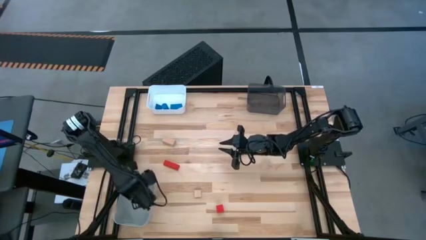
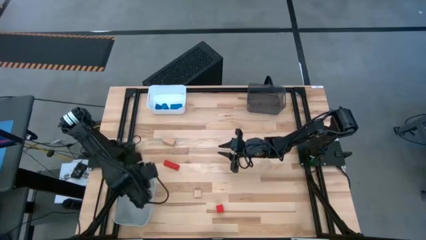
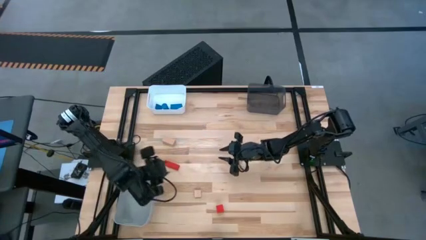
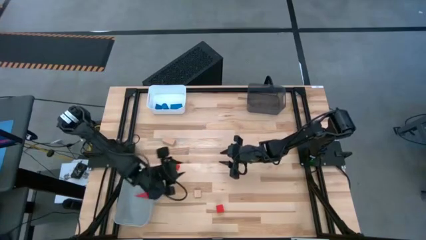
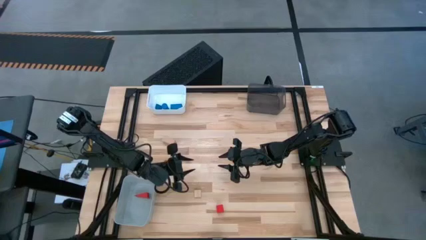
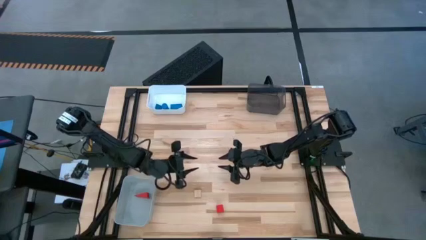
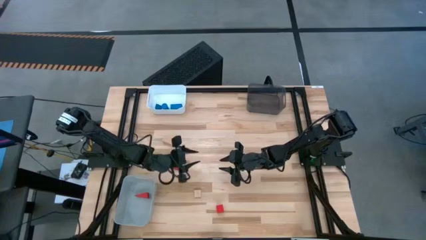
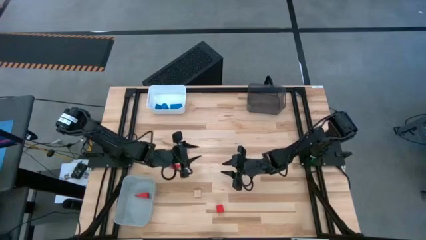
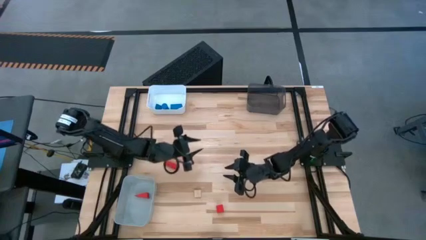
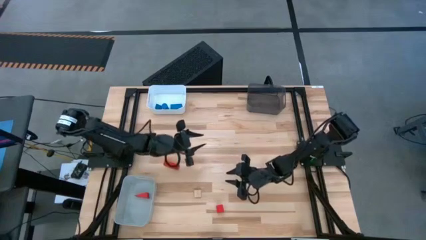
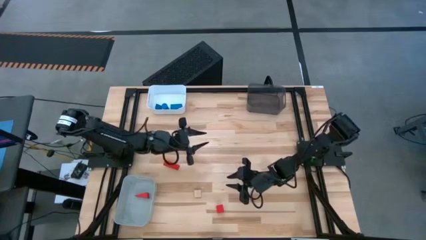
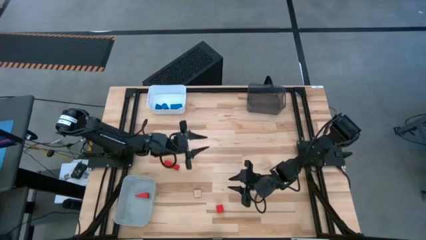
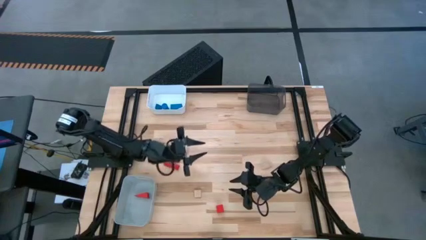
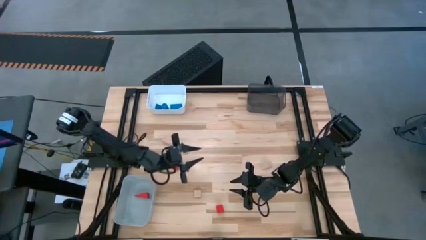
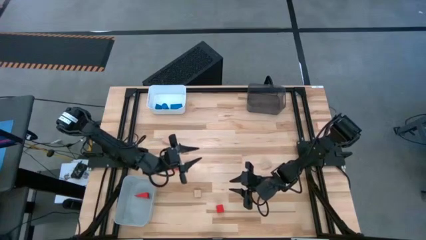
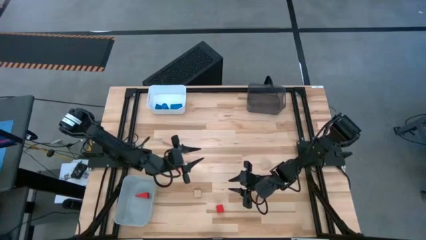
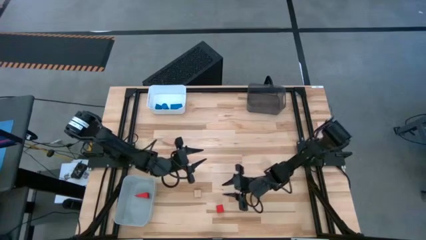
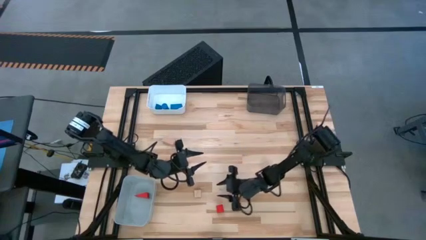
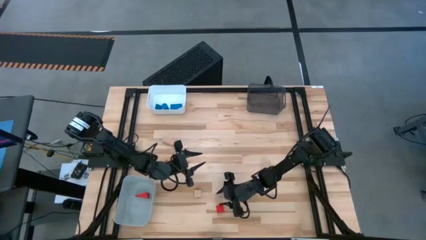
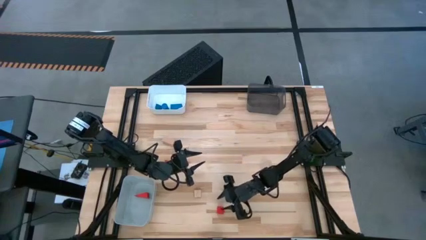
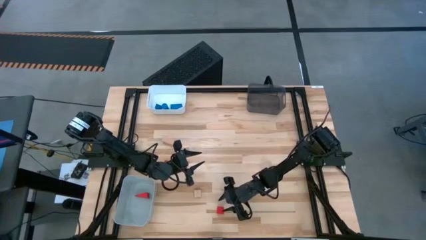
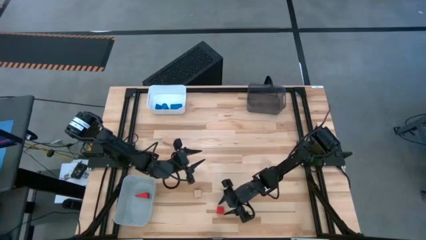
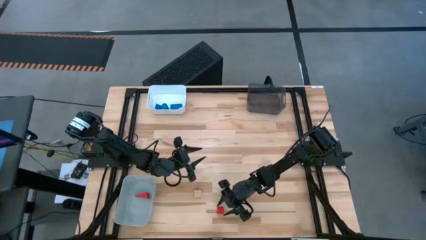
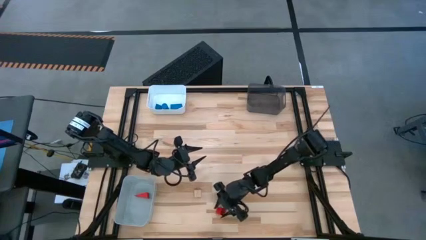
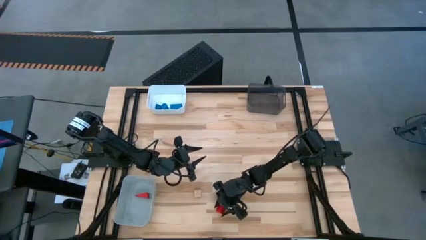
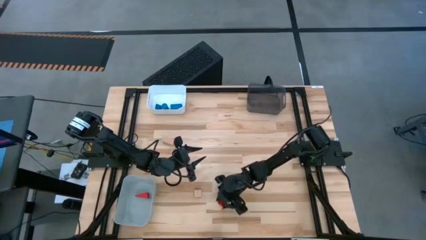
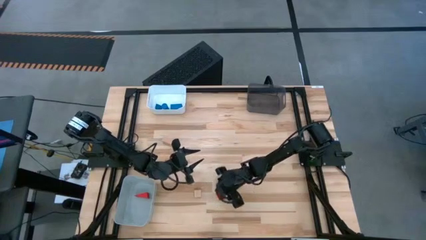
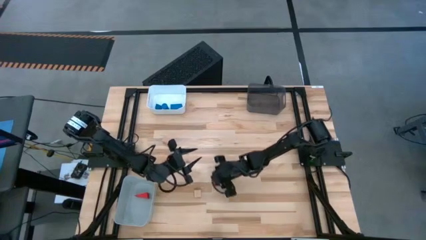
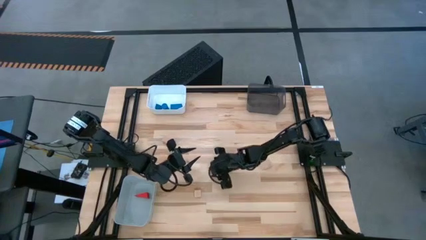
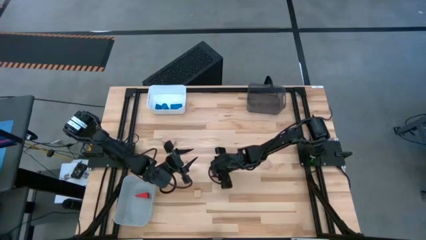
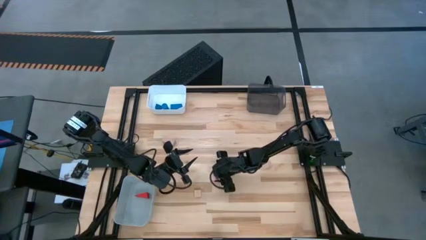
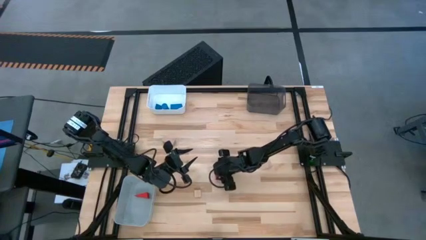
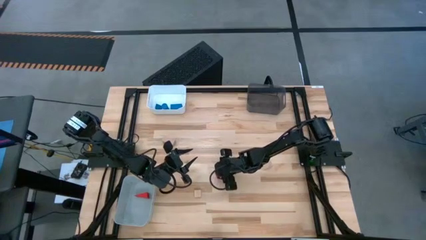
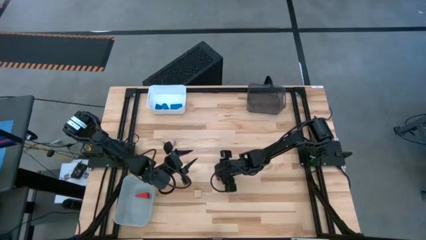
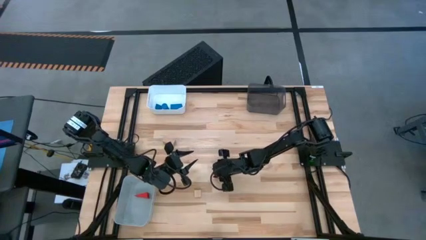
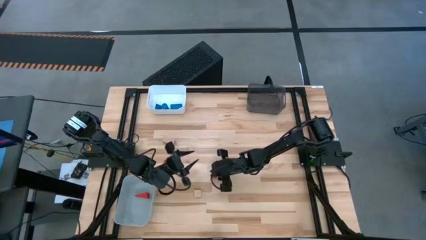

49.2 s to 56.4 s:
Task: Sort & place blocks by color
Put the bottom red block into the gray bin

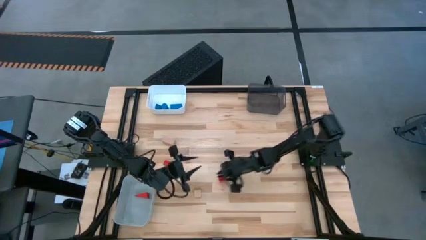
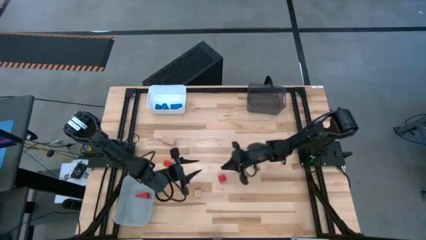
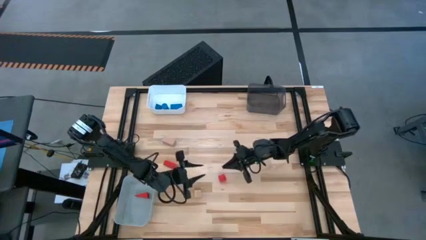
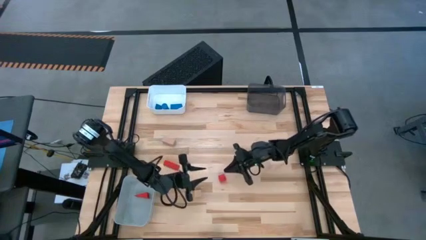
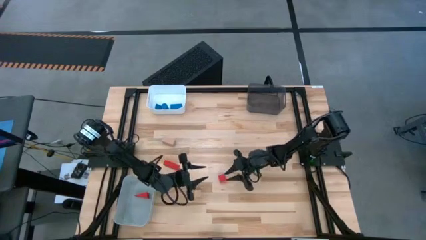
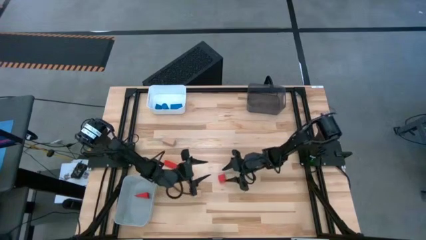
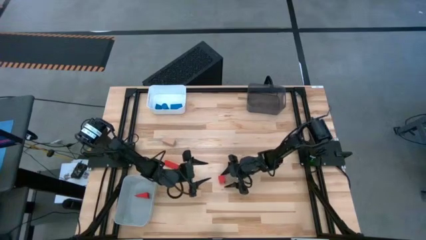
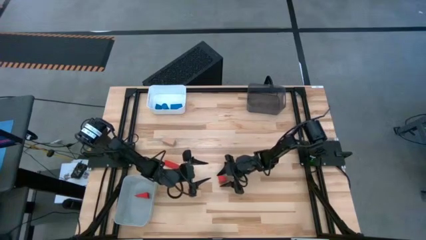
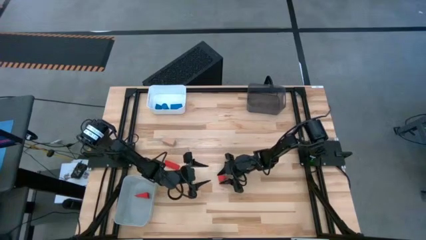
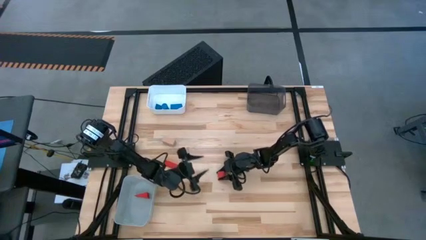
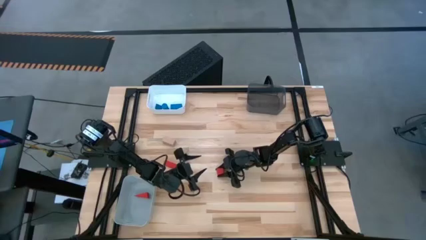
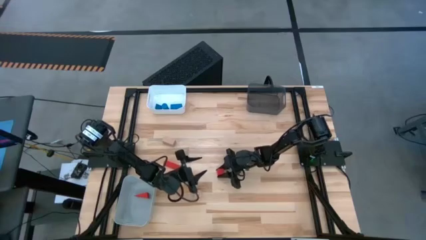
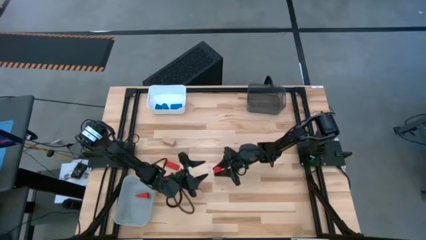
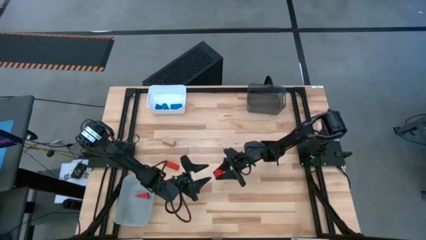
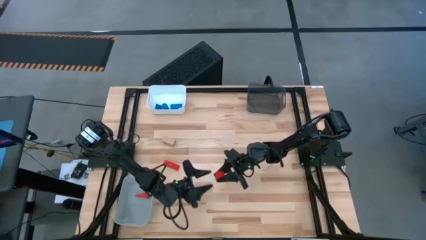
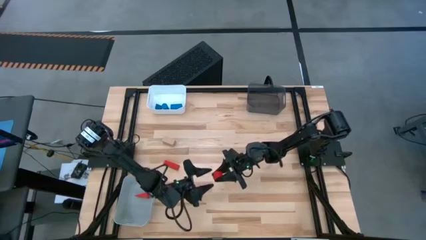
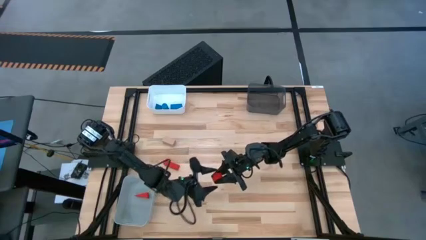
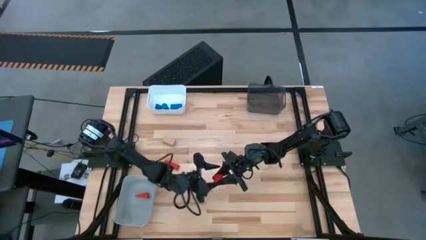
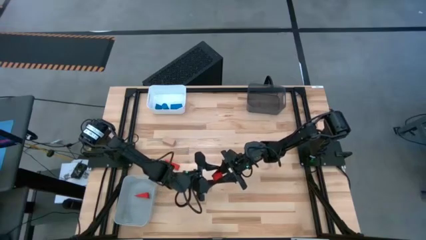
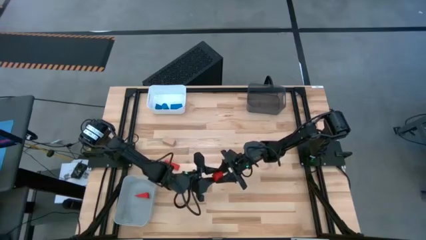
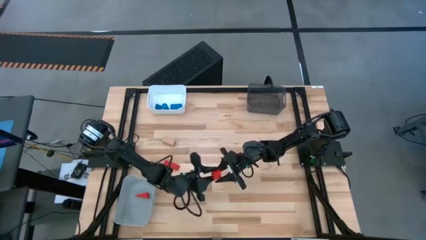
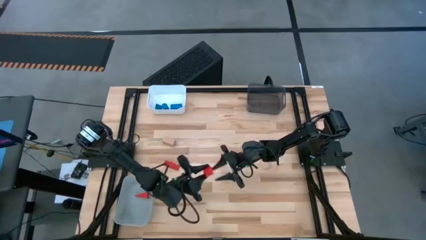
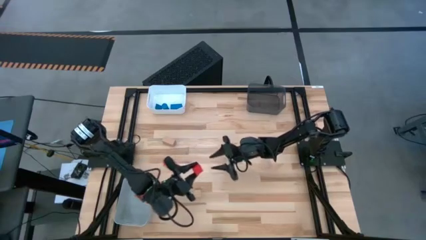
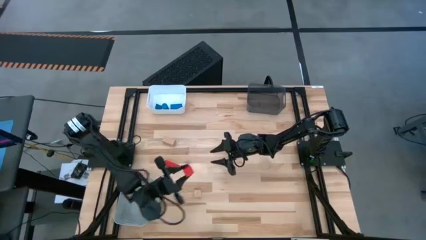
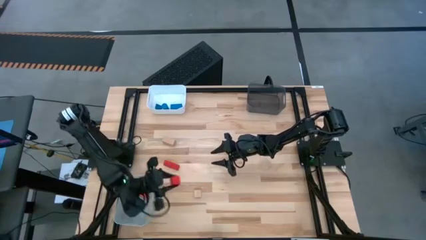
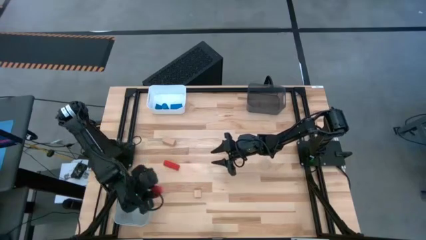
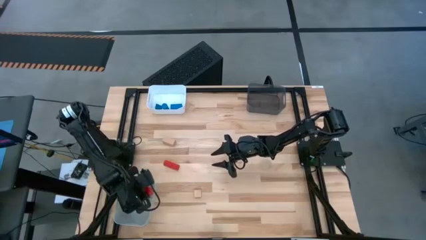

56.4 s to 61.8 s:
Put the bottom red block into the gray bin

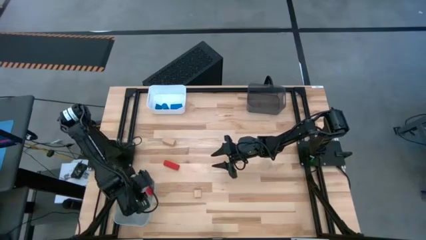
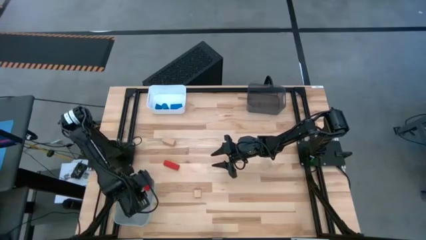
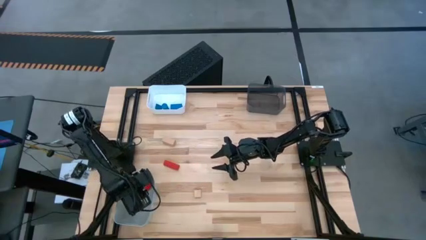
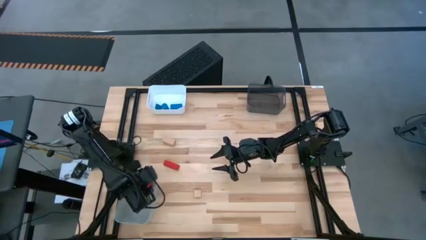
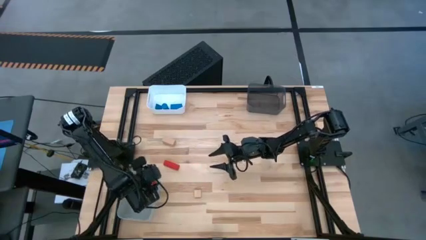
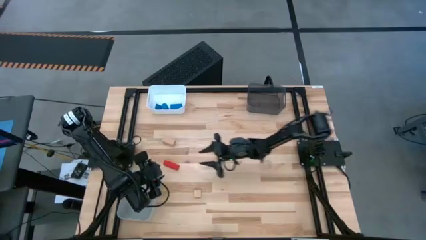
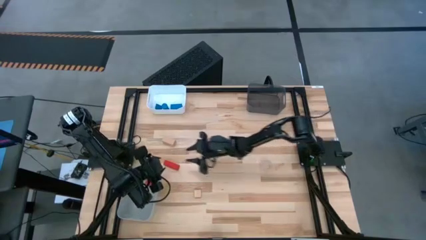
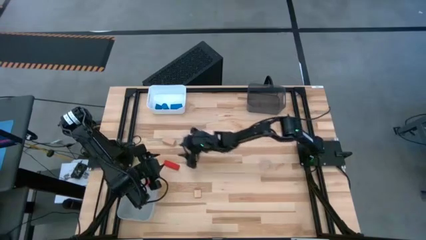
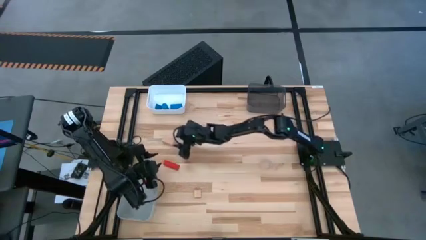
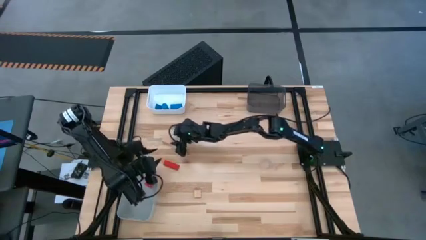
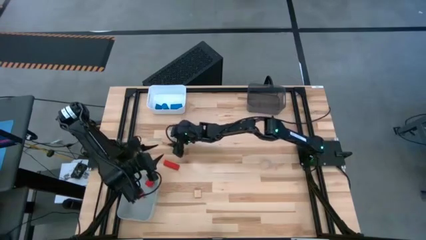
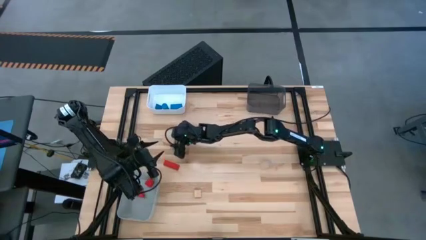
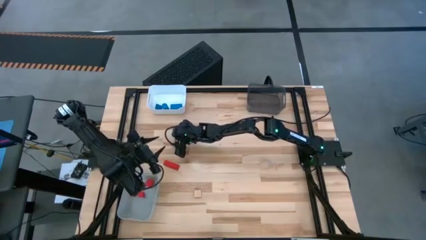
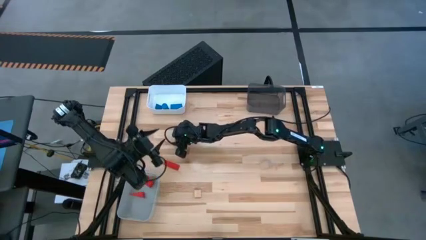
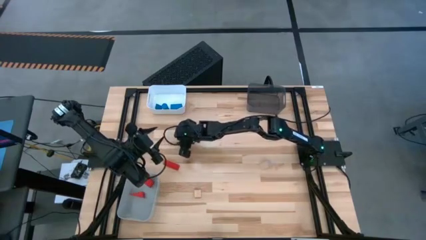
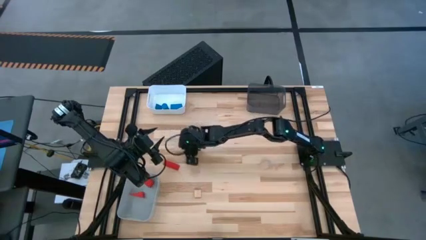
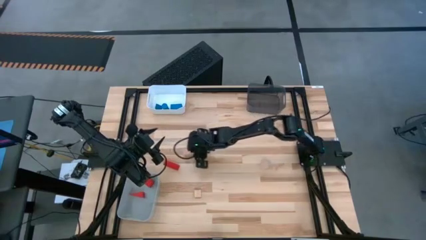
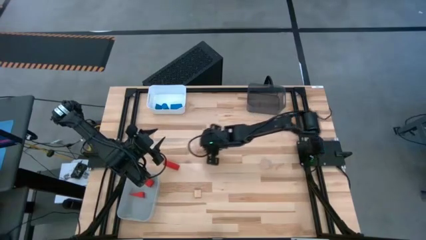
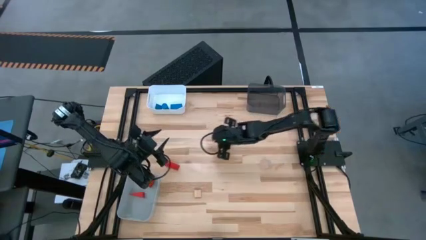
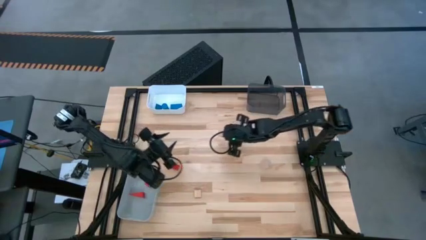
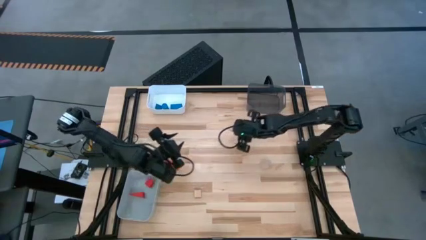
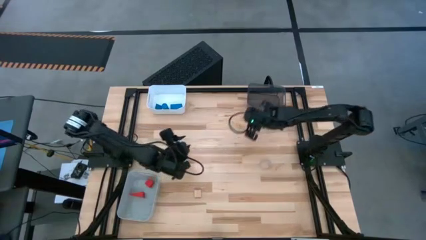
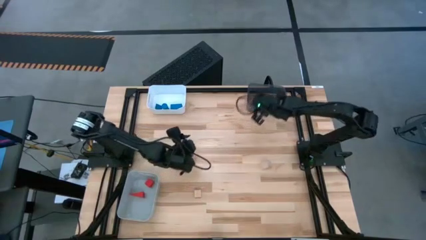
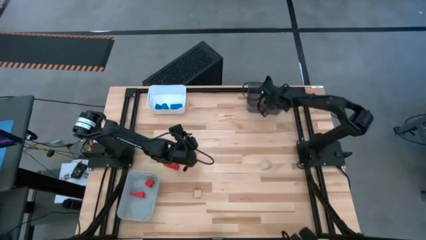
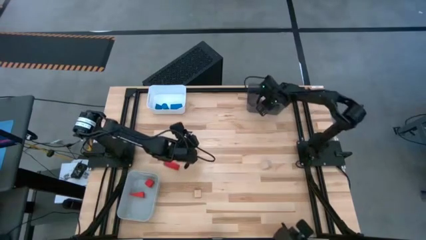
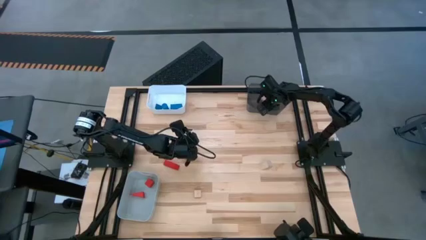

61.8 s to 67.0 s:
Put the top left brown block into the black bin
